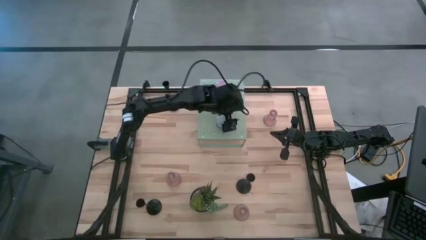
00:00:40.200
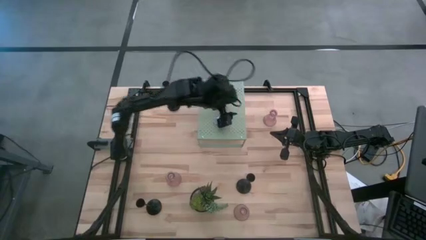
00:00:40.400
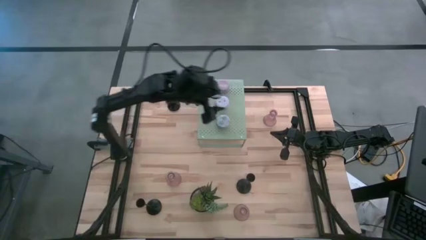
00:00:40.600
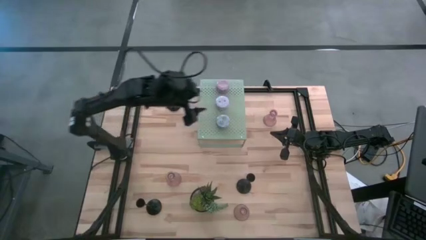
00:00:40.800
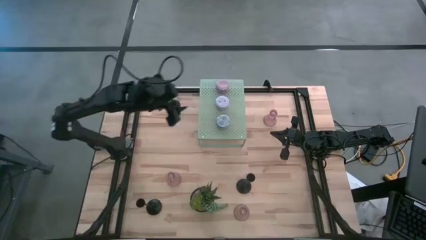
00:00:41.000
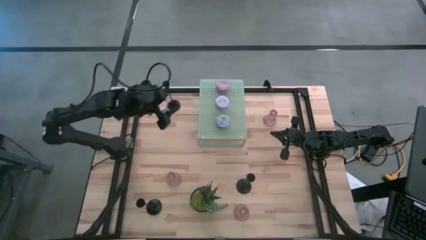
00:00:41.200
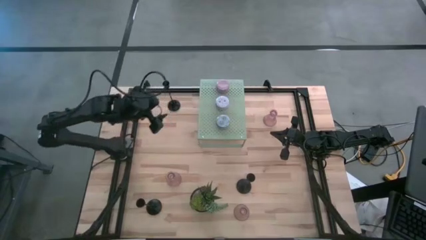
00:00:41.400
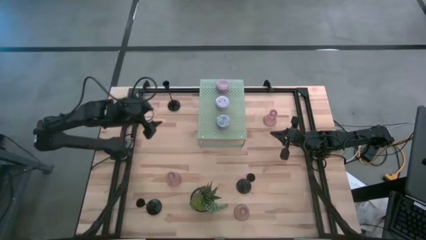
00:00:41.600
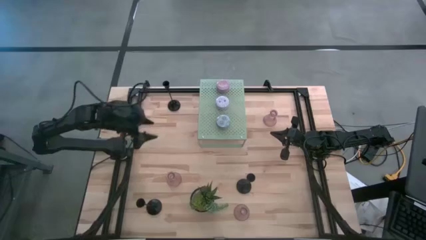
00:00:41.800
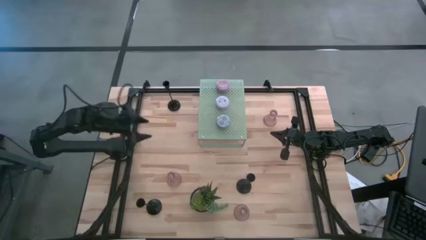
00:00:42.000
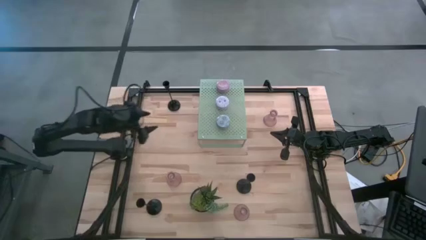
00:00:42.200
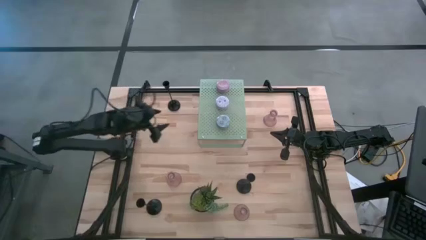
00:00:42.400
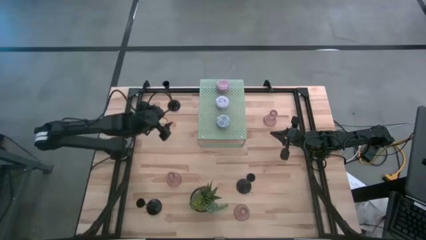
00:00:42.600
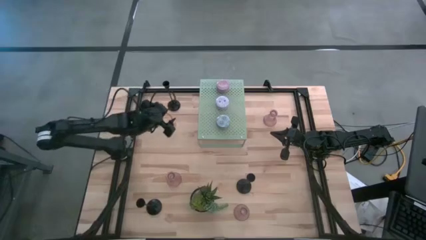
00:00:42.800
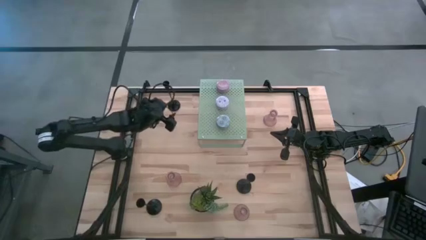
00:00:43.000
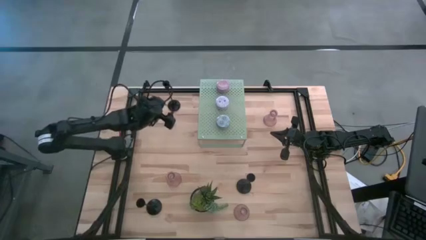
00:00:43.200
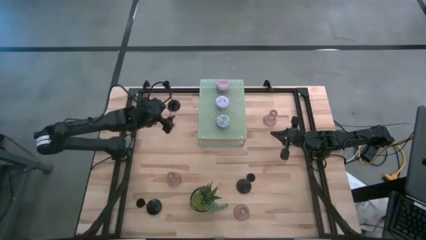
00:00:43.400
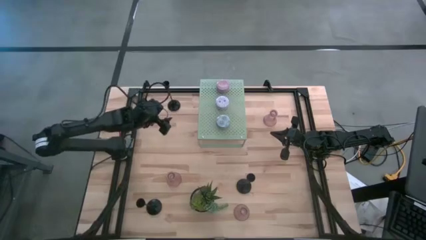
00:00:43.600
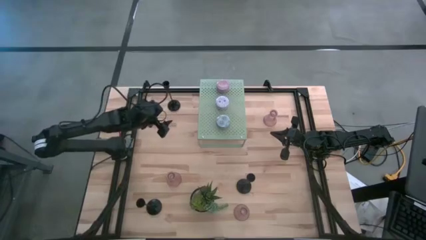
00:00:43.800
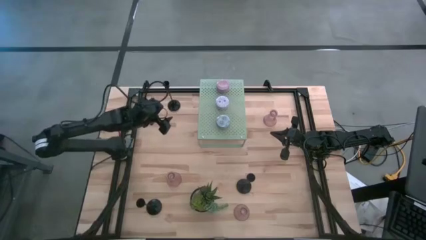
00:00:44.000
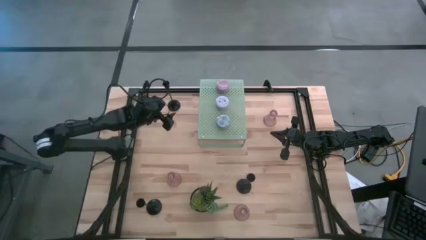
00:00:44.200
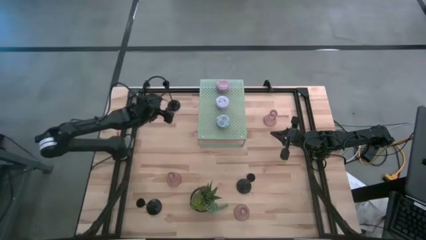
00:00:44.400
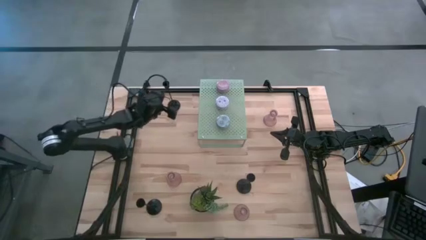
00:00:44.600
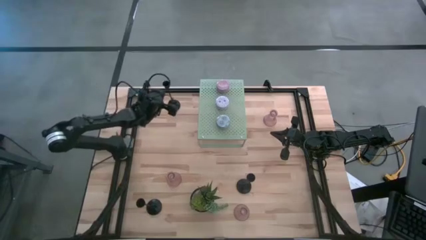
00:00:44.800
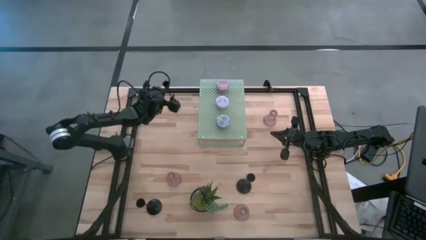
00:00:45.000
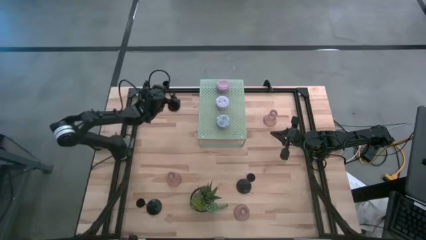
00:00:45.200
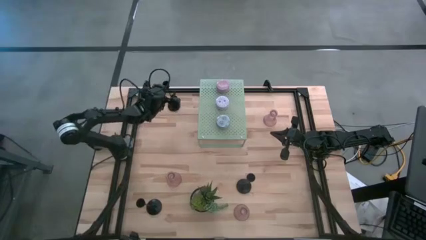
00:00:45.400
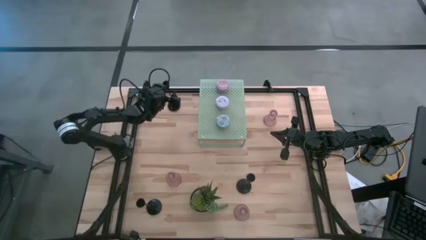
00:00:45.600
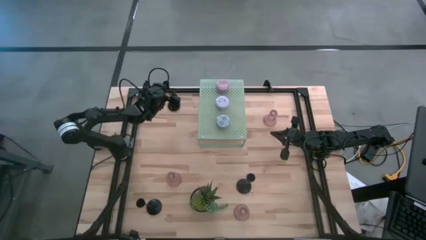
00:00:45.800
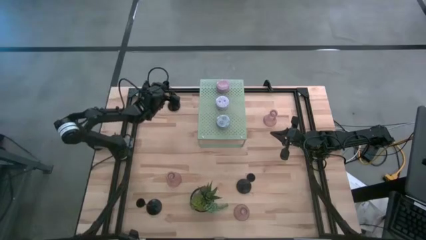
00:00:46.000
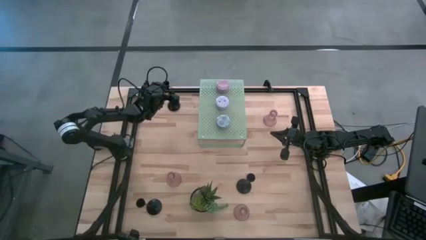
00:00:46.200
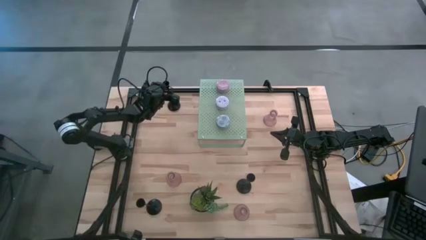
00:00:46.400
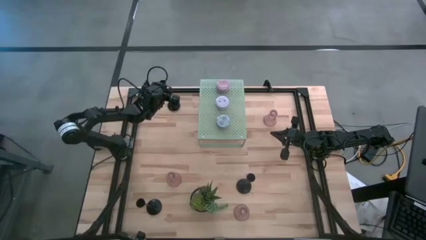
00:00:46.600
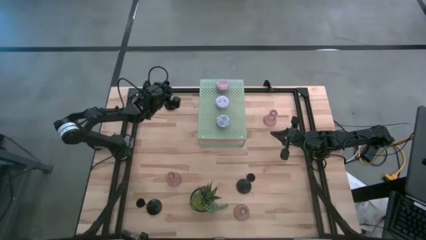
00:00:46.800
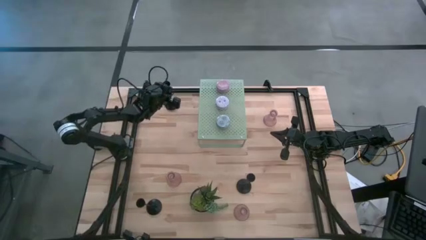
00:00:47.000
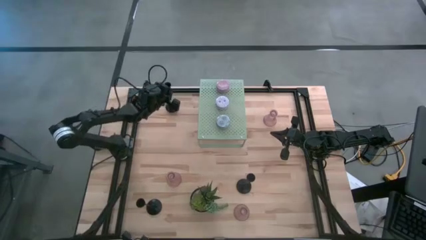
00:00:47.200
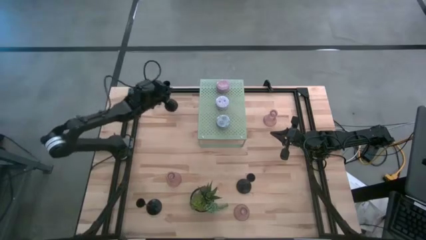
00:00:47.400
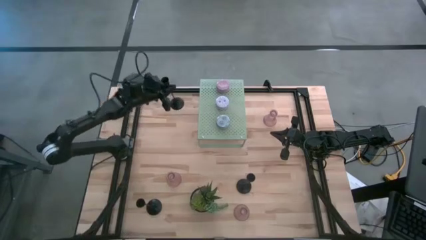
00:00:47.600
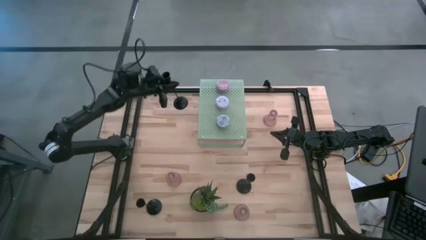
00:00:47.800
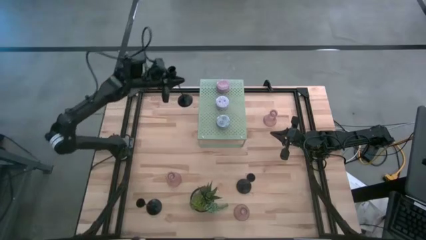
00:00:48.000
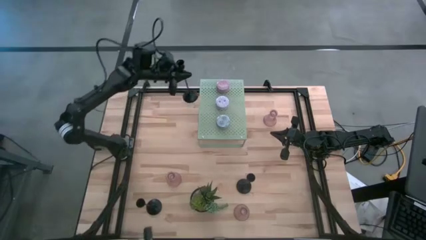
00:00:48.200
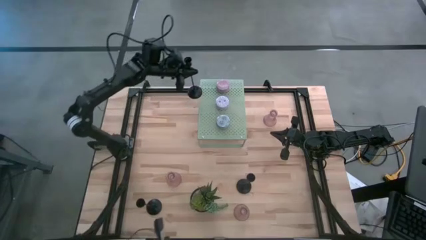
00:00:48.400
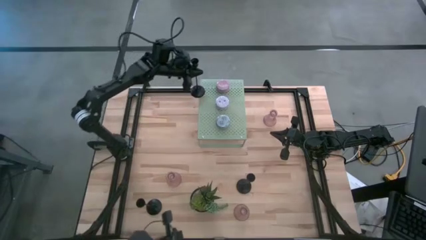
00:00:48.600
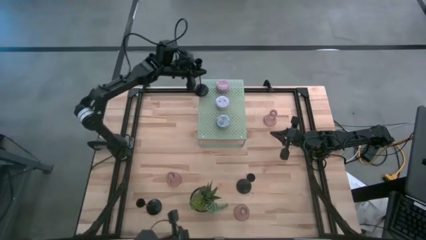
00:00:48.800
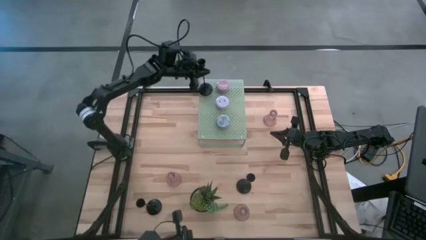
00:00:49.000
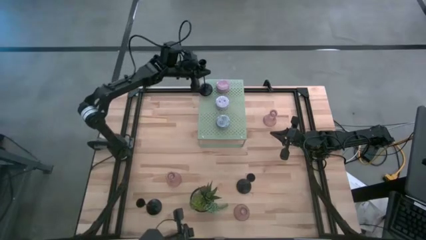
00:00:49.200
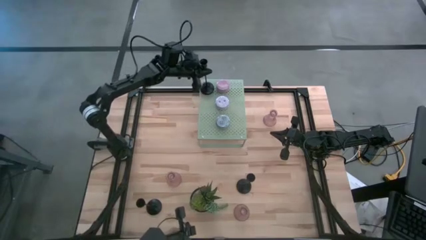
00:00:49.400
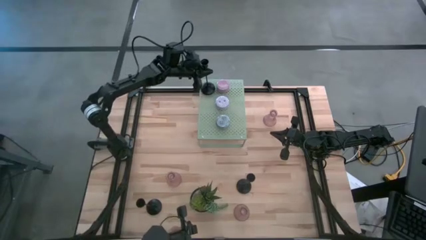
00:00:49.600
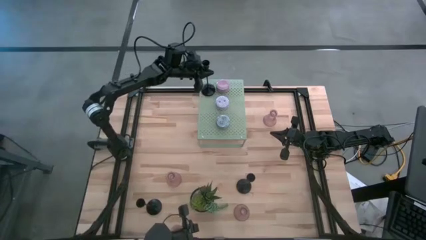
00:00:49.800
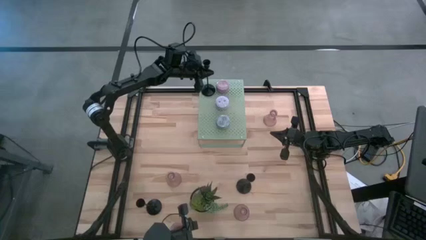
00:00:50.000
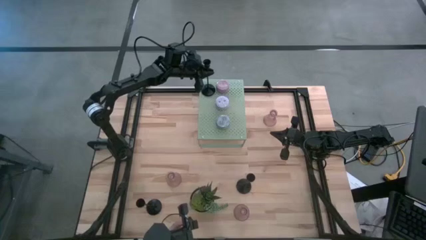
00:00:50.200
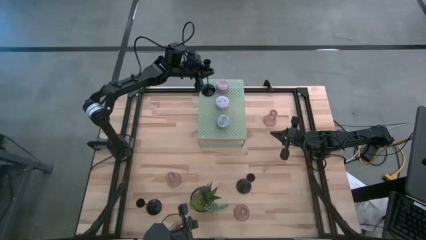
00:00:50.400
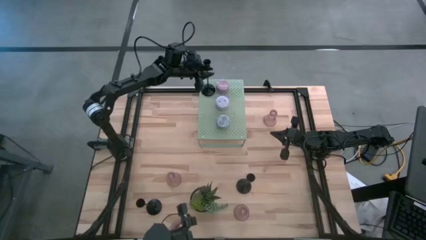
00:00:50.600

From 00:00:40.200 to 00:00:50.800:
Task: Pick & Place candle stick holders
Put the top left black candle holder on the shelf

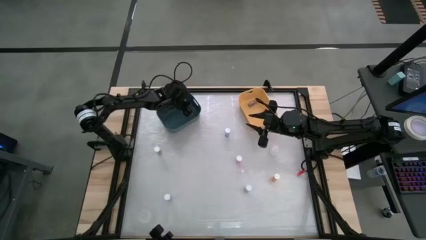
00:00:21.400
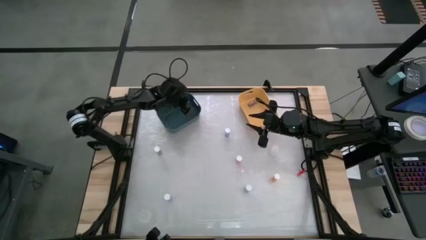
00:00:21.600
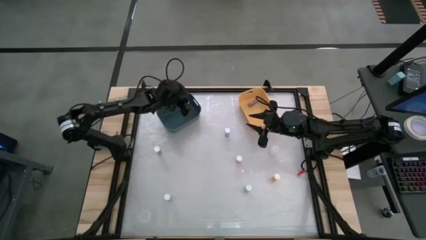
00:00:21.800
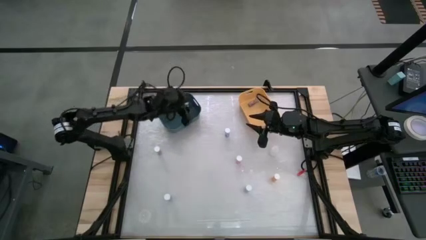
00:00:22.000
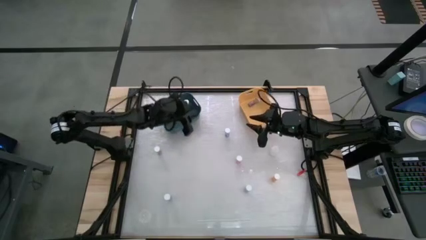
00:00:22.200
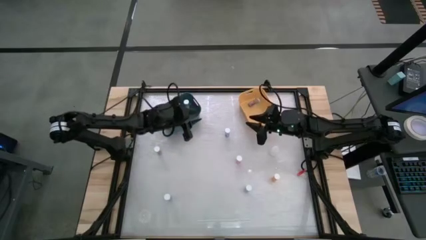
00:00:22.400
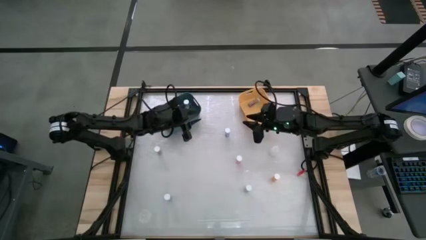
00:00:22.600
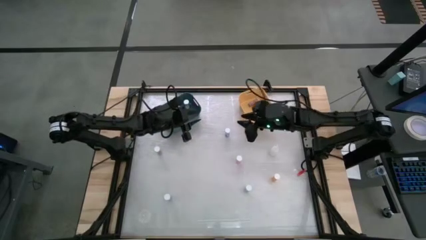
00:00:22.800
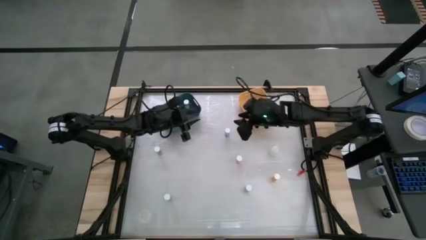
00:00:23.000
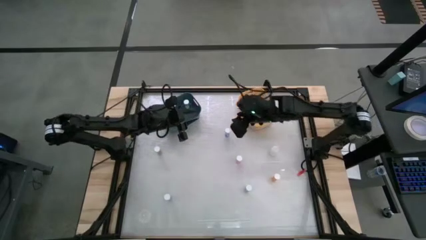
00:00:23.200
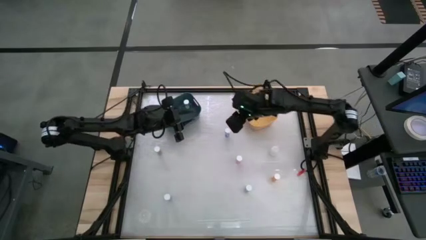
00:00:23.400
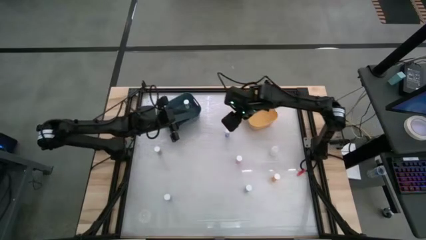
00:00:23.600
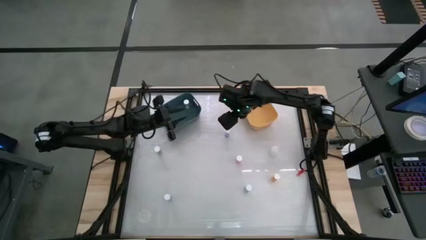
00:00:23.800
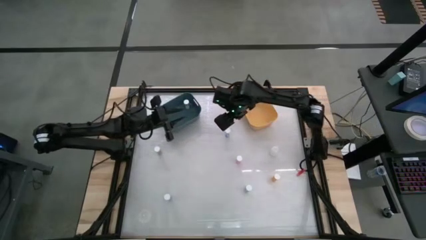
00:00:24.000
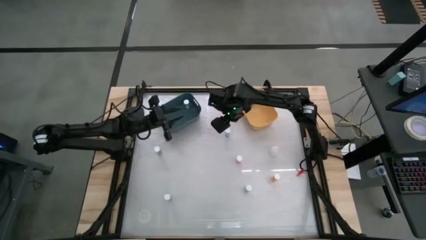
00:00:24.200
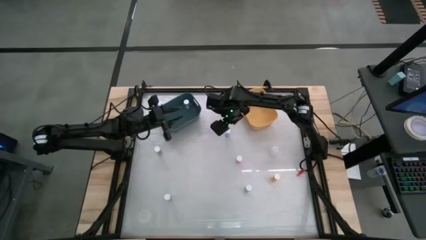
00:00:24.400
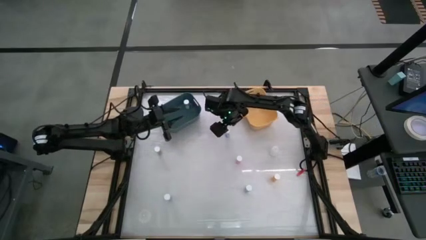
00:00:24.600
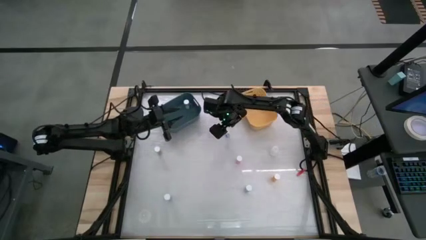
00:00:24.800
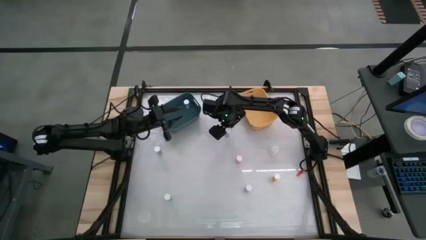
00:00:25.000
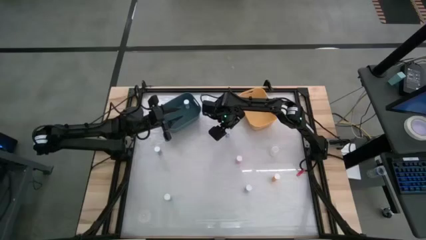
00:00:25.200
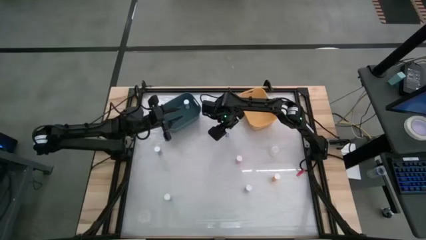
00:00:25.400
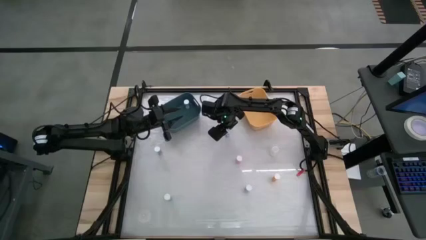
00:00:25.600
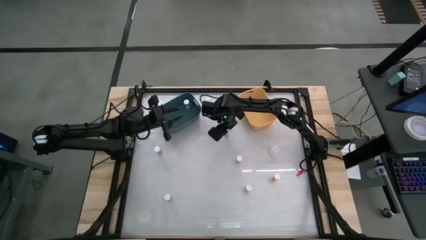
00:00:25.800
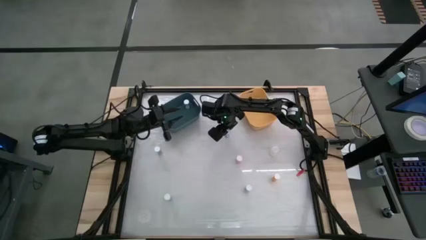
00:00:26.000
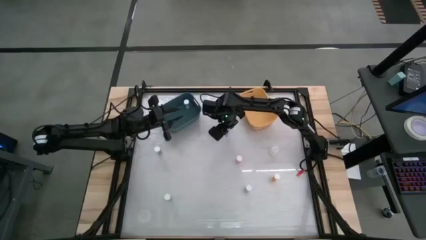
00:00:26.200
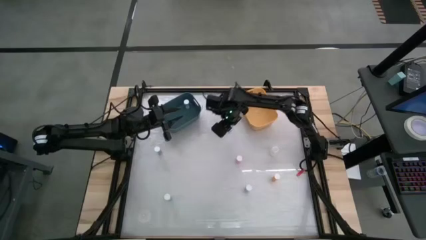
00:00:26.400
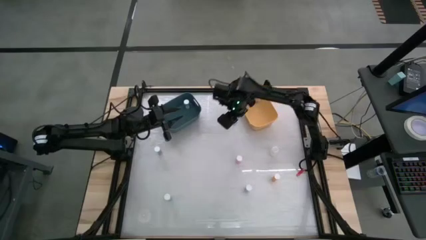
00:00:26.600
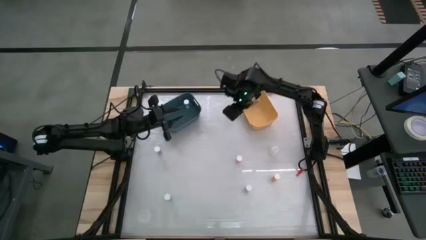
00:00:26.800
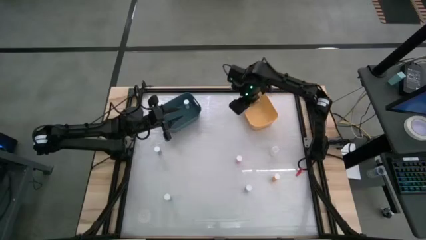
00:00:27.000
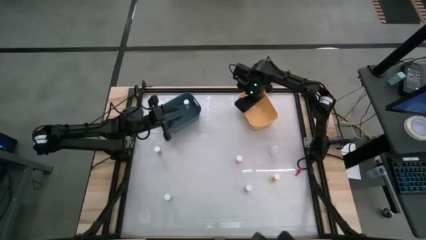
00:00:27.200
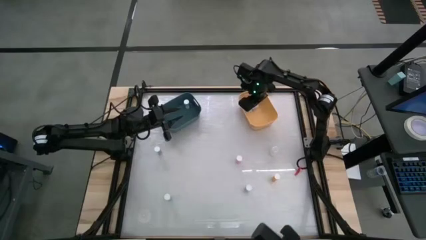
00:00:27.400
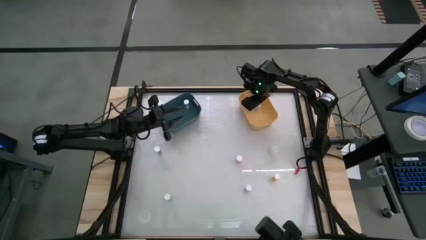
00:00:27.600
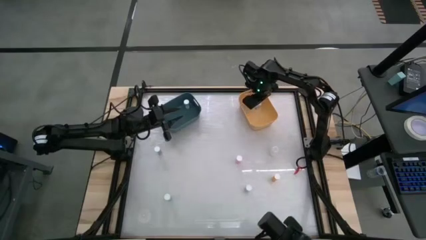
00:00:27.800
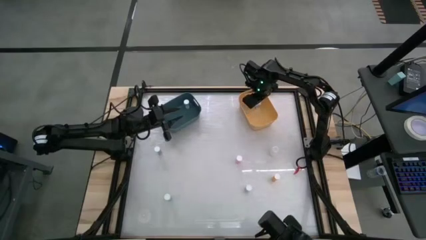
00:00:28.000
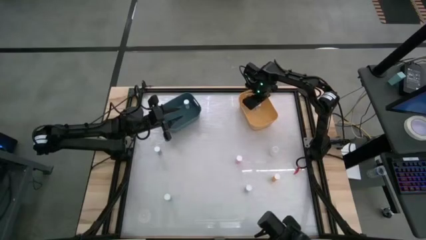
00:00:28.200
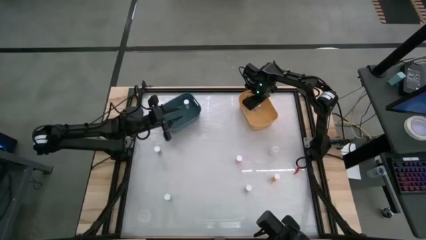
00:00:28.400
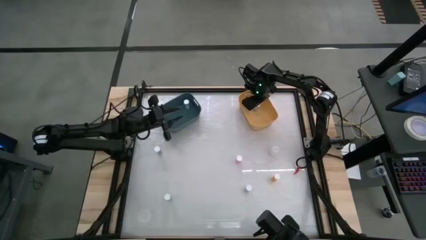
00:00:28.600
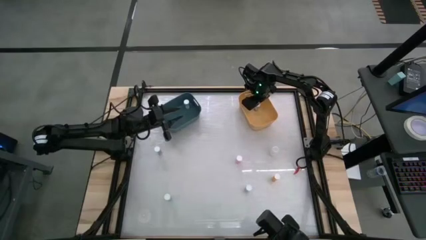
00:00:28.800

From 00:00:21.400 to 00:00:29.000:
Task: Pick and place medicine bottles into bin by pill shape (circle, oval)
Put the blue capsule bottle into the yellow bin
